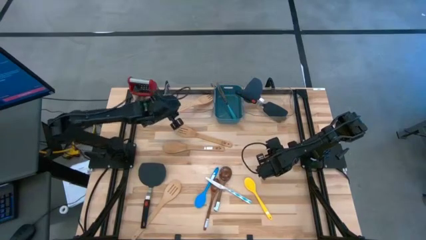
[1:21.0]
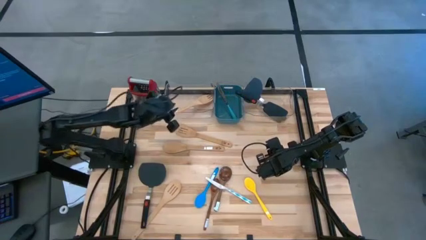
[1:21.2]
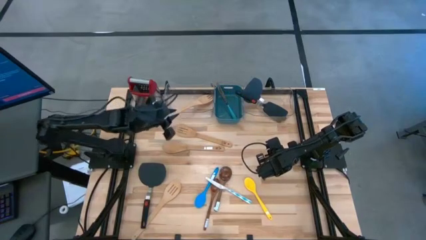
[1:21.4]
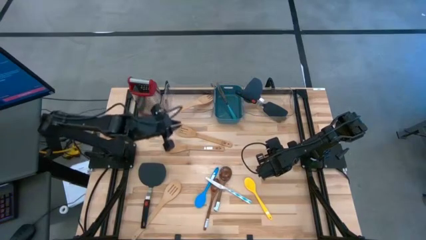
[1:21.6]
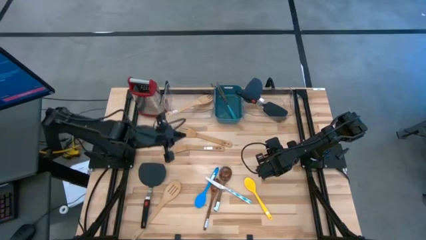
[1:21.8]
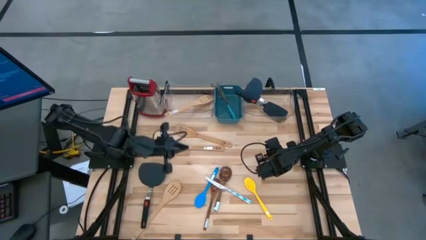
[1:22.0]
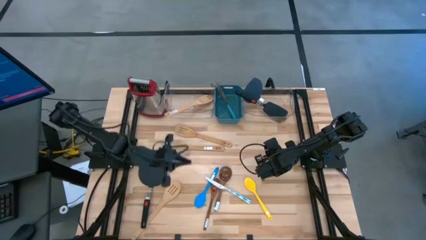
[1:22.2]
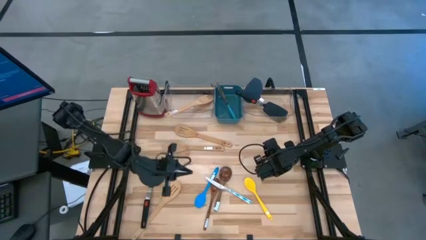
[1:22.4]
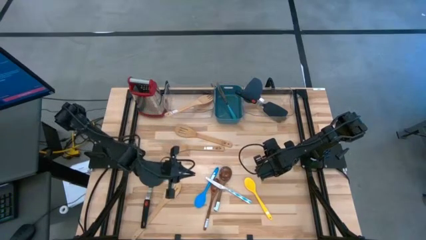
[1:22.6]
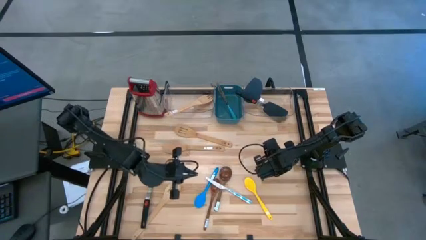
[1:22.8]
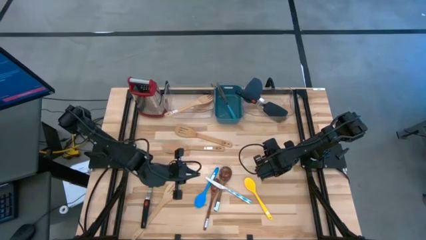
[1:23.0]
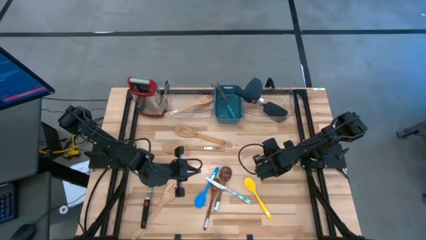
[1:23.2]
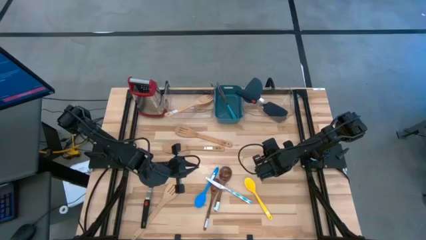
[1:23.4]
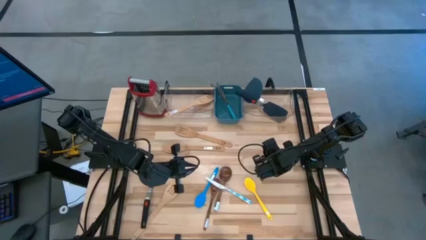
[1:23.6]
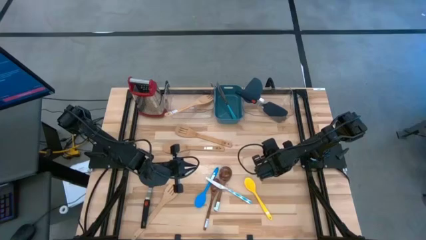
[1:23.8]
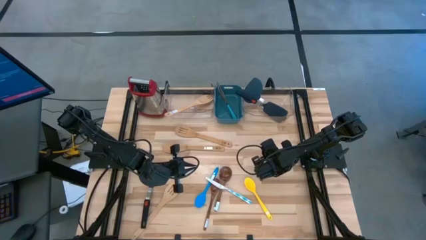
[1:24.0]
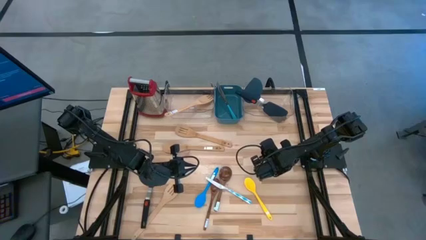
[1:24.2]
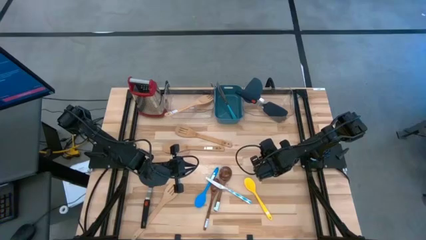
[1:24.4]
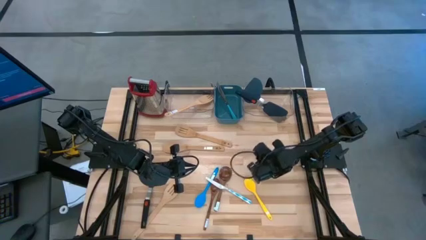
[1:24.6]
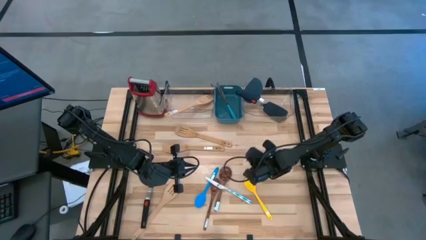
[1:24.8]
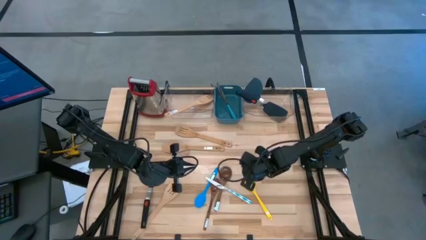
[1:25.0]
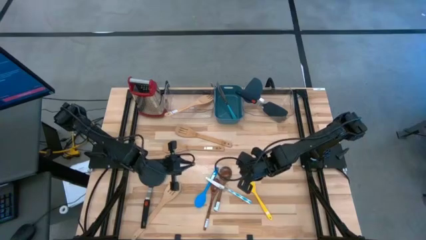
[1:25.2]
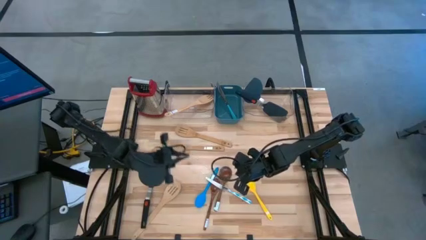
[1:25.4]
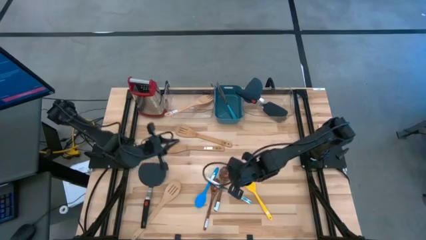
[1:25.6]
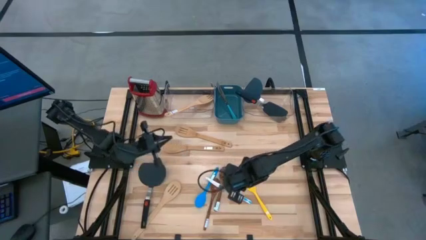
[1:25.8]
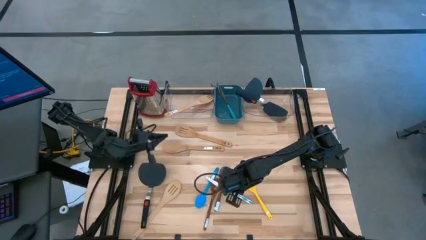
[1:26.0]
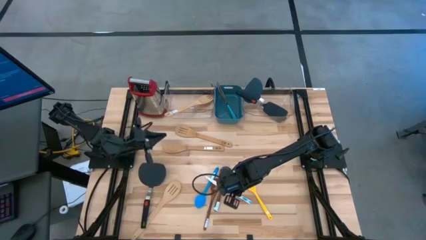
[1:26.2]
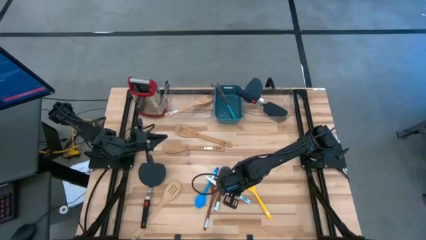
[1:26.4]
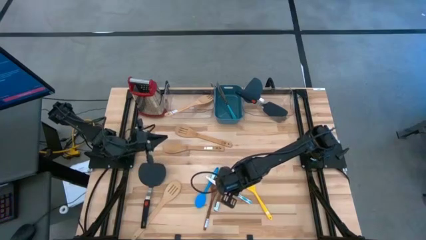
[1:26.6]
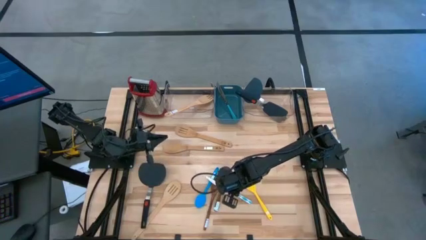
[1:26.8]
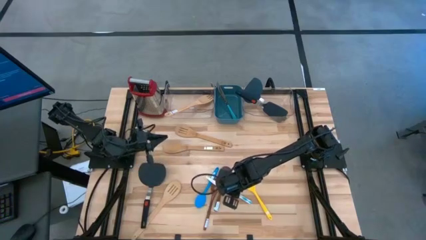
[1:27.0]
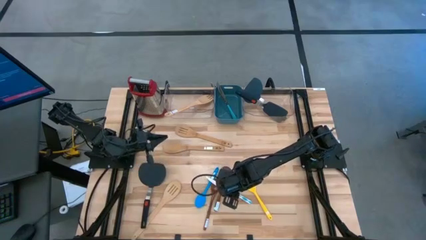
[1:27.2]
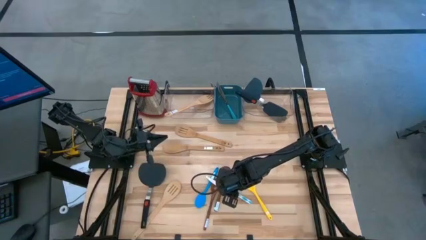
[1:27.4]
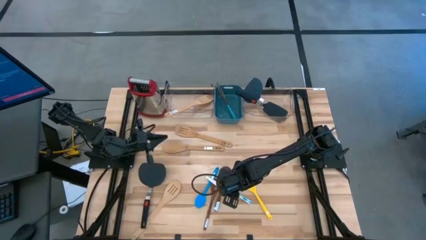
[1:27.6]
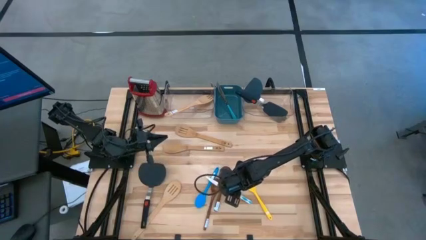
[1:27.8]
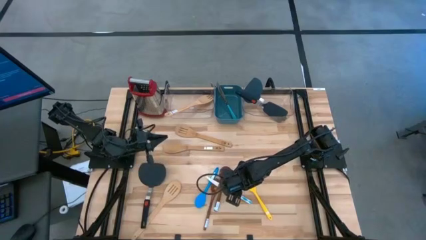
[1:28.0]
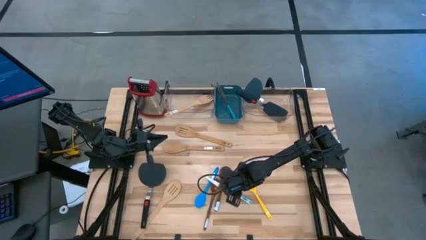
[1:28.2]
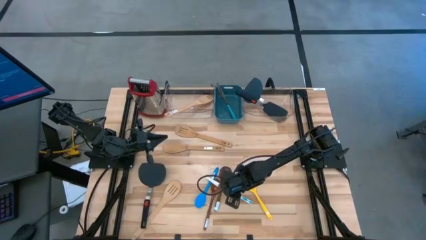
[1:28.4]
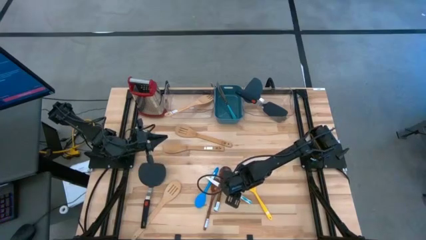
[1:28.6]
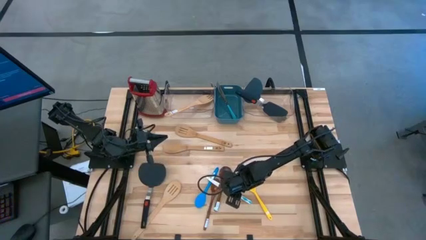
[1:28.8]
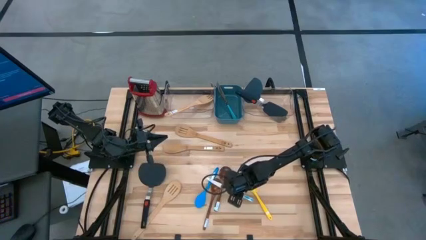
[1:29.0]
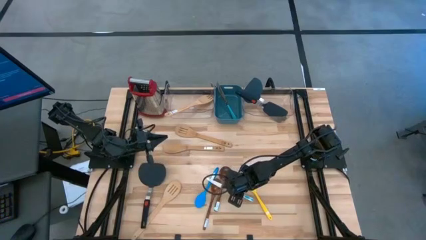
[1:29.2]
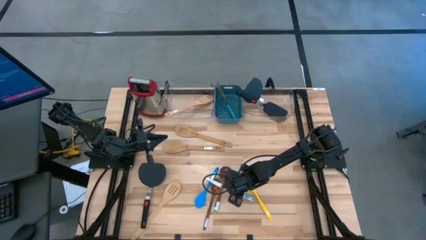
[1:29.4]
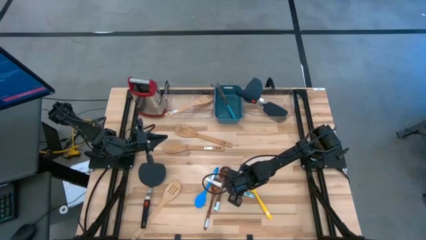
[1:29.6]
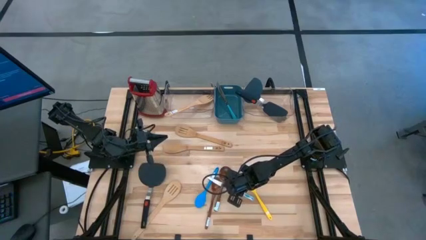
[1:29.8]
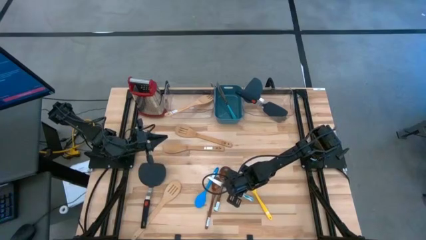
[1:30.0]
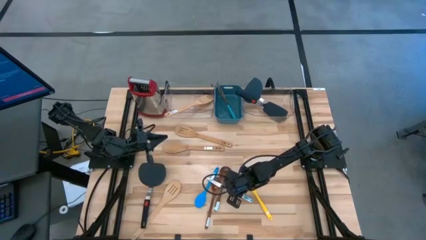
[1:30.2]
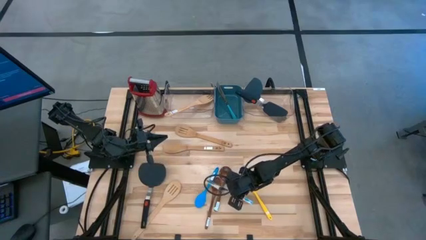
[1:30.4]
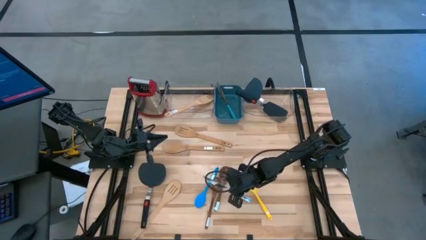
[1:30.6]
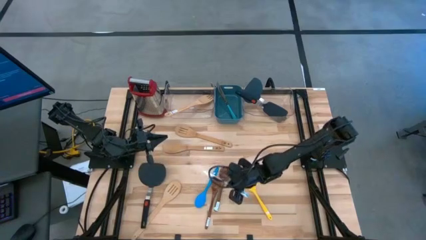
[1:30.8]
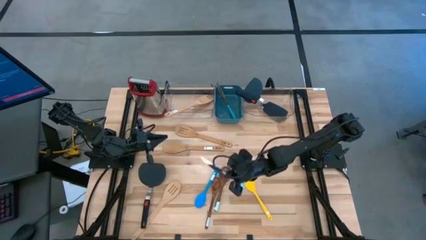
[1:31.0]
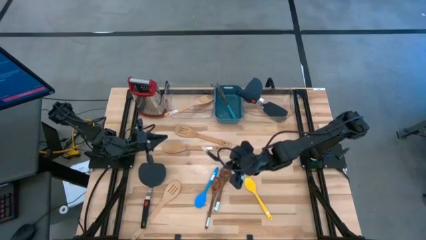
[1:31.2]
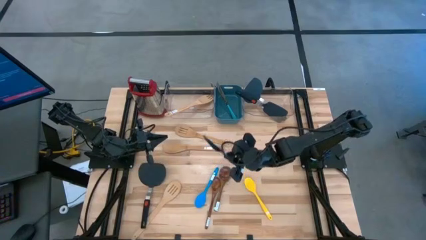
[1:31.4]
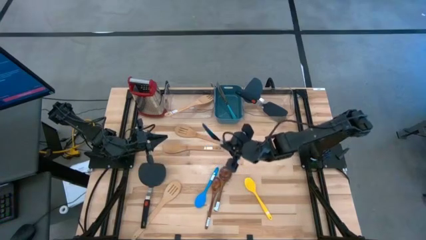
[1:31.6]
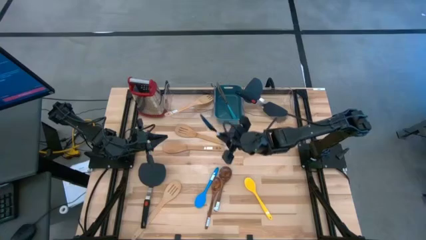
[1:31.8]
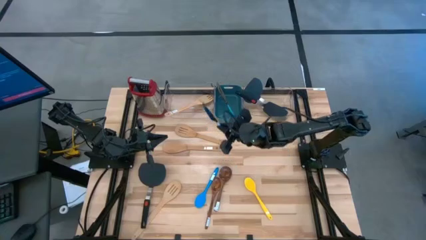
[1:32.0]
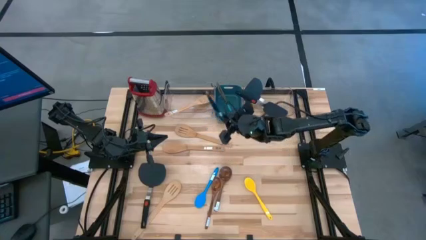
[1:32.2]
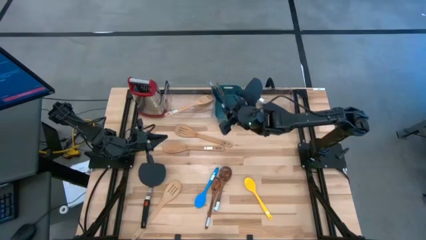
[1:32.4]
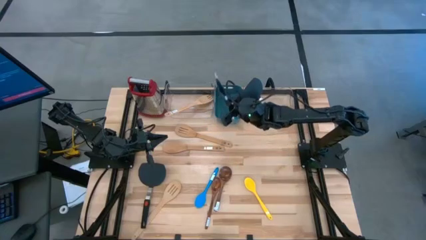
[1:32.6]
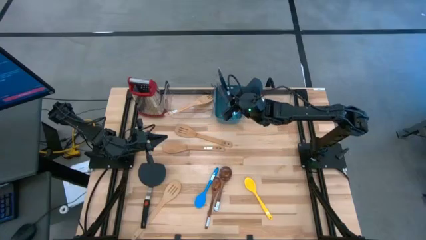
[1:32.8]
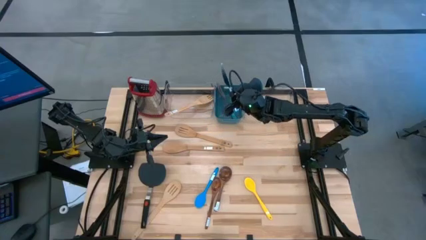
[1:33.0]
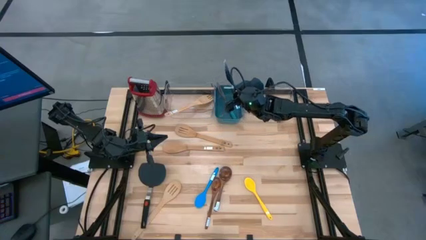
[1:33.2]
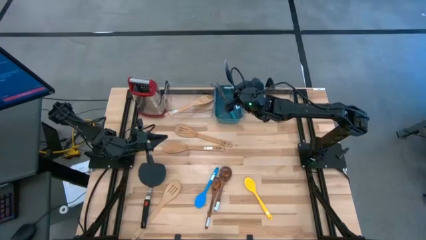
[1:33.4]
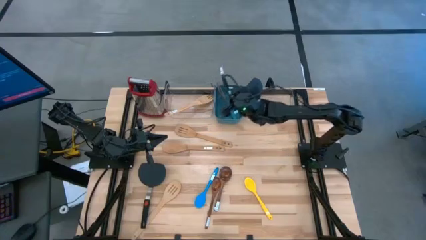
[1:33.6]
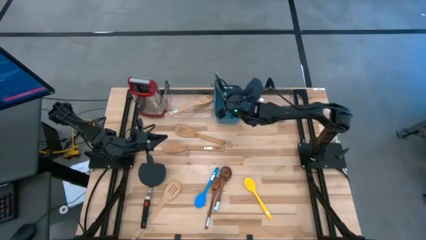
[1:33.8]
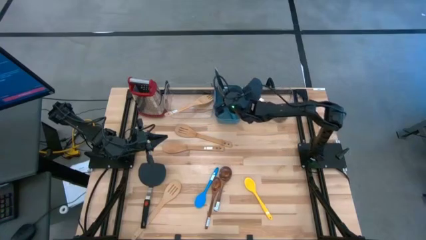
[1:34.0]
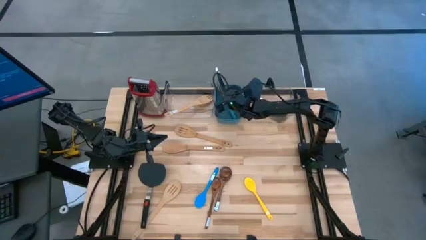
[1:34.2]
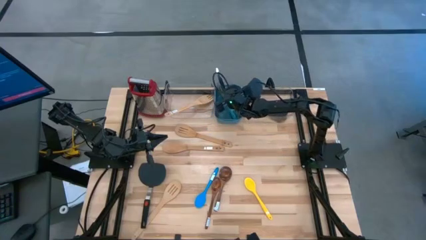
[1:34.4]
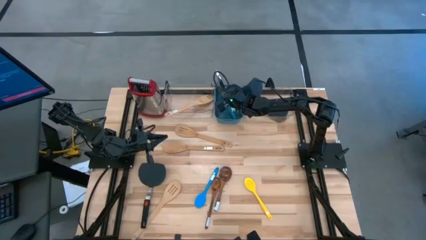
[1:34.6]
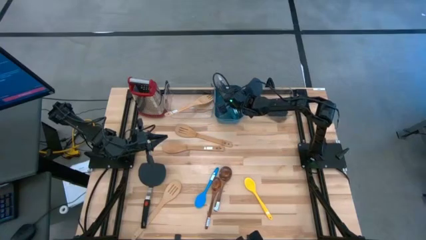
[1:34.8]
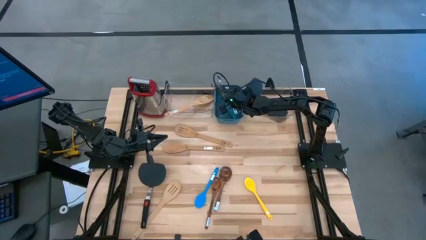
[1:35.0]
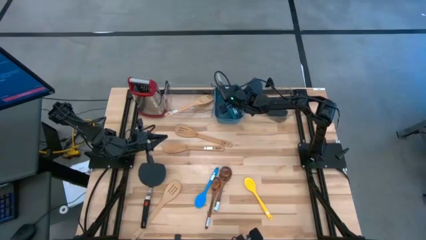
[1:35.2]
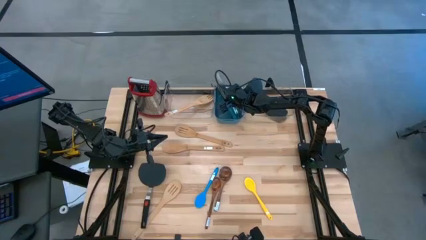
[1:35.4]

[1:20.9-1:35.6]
Task: Pick & Place Kitchen Items
Put the blue table knife into the blue bin

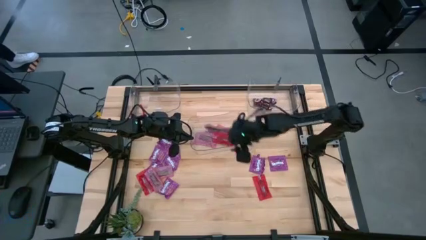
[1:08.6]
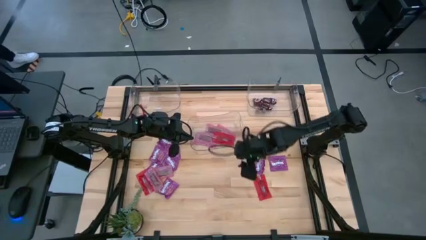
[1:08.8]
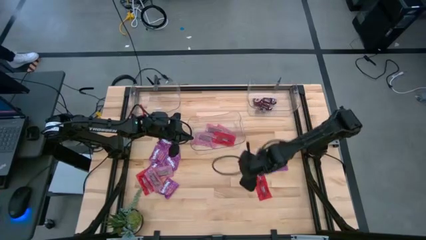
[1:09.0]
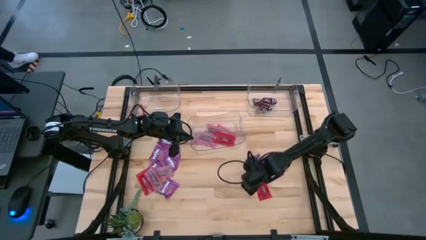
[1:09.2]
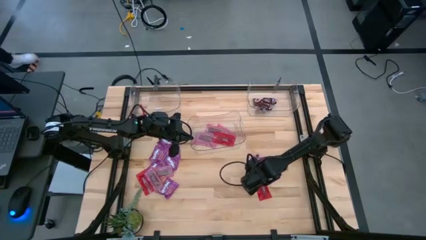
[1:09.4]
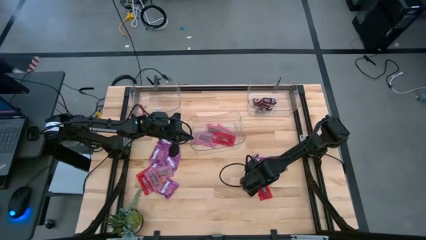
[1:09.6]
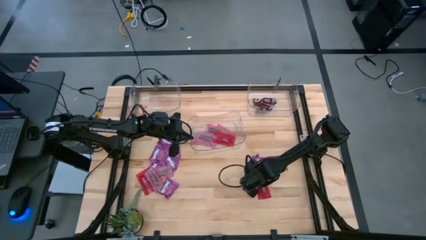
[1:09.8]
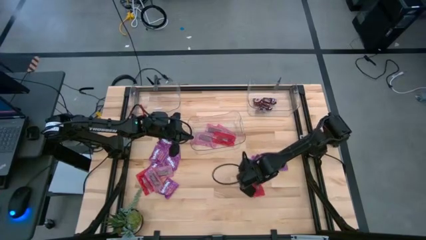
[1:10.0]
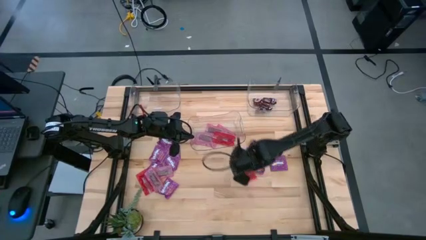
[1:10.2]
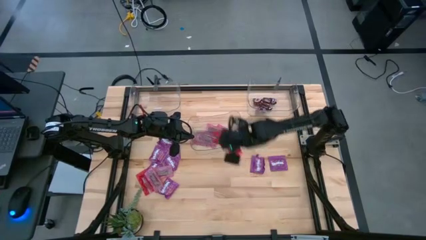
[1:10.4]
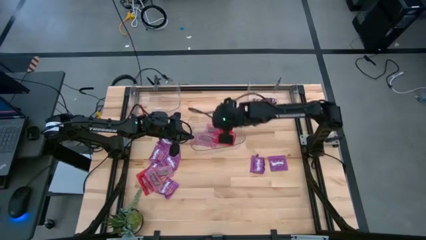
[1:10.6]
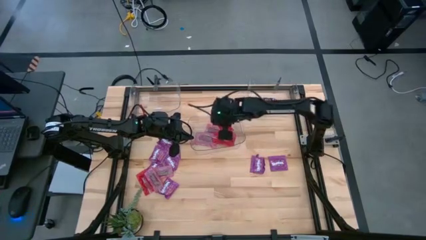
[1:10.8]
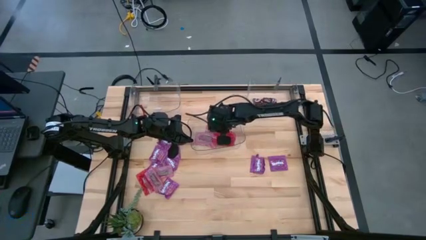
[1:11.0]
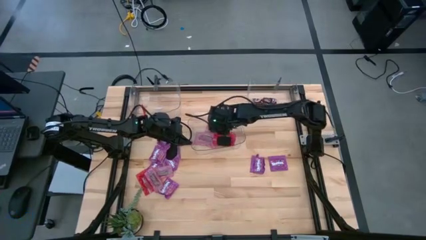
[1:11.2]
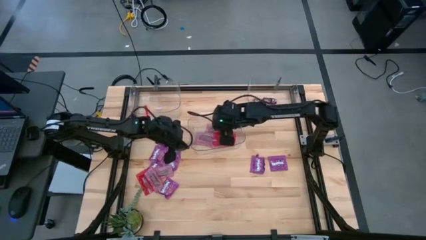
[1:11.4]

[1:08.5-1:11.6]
Task: Sort candy
Put the red candy pack into the bottom transparent bin
